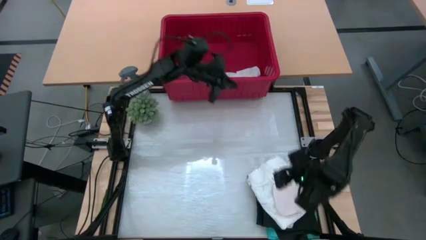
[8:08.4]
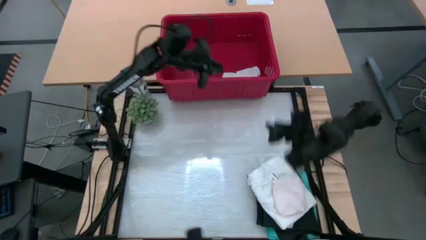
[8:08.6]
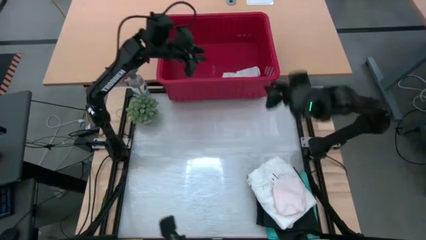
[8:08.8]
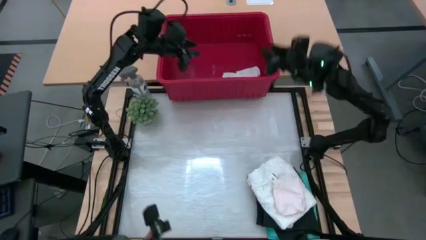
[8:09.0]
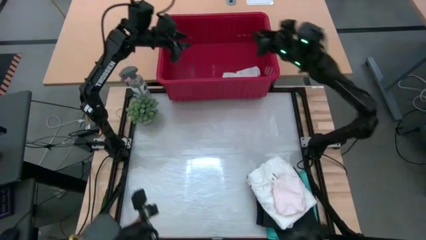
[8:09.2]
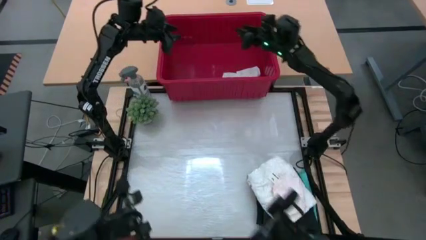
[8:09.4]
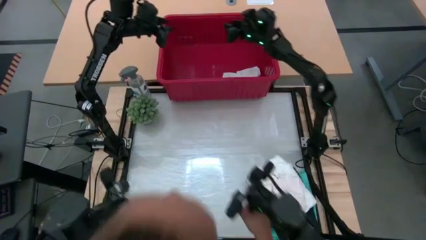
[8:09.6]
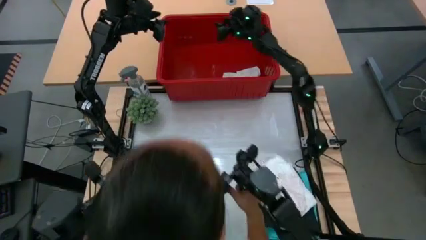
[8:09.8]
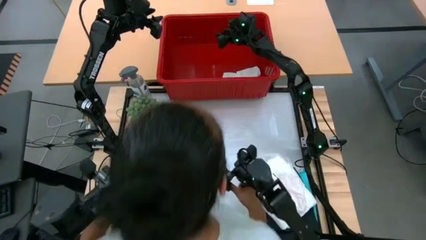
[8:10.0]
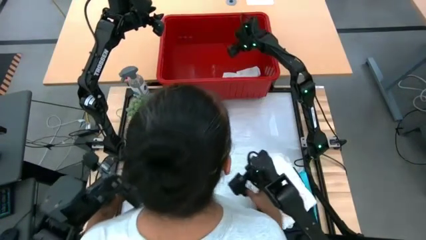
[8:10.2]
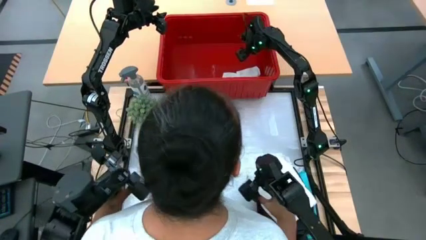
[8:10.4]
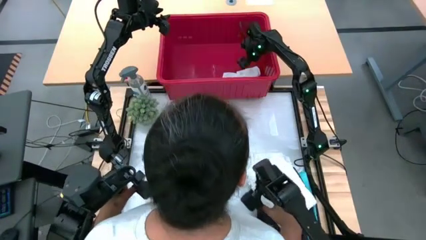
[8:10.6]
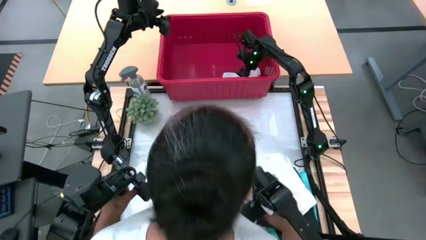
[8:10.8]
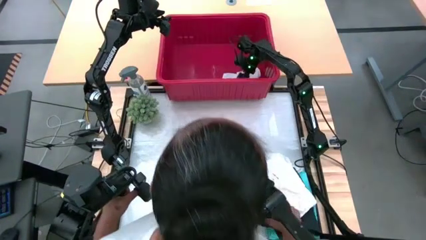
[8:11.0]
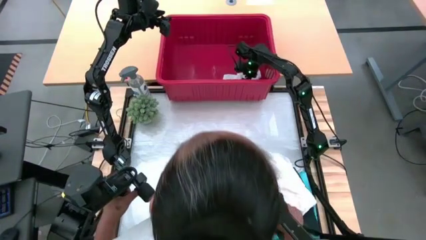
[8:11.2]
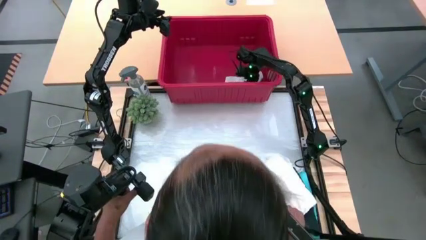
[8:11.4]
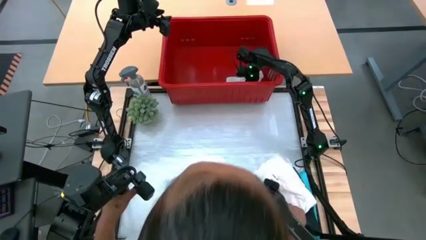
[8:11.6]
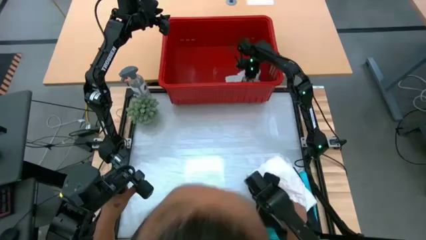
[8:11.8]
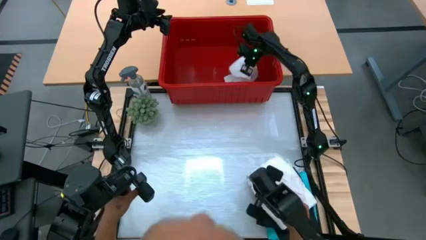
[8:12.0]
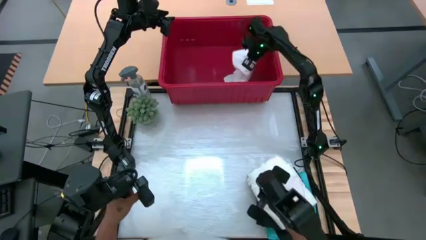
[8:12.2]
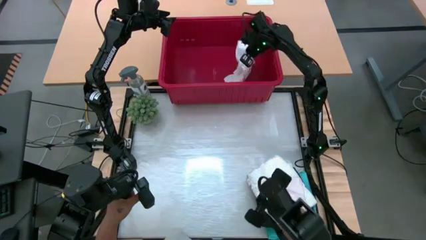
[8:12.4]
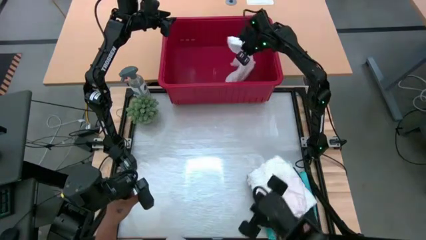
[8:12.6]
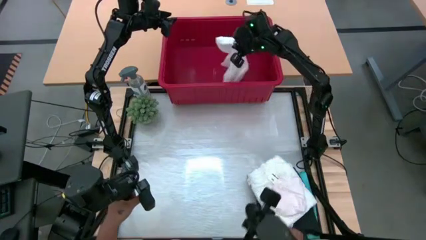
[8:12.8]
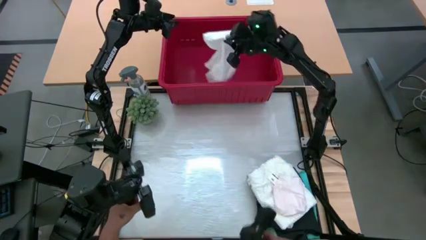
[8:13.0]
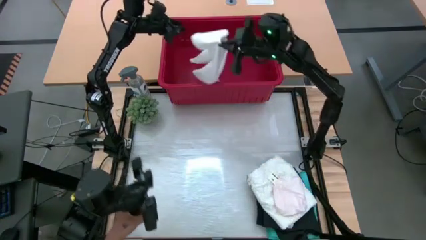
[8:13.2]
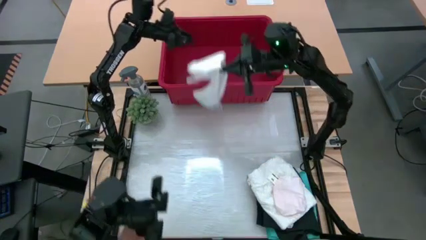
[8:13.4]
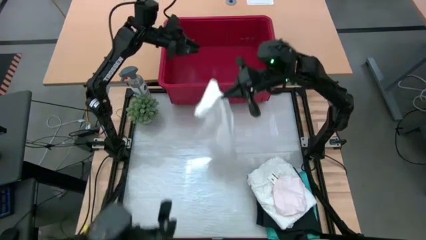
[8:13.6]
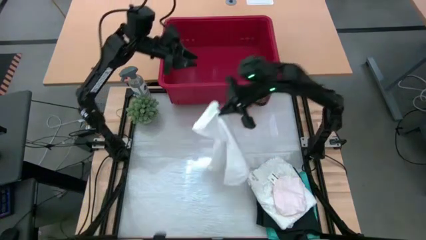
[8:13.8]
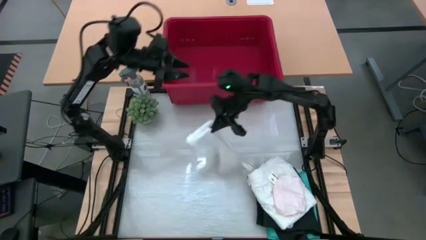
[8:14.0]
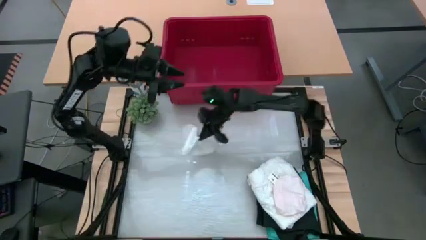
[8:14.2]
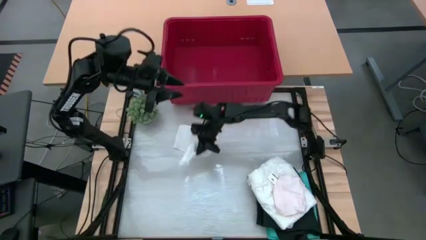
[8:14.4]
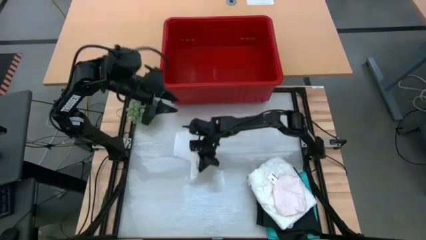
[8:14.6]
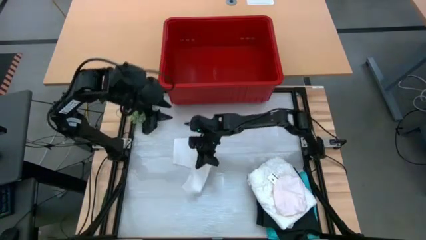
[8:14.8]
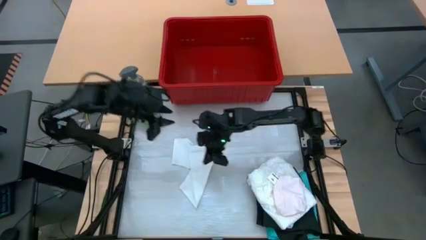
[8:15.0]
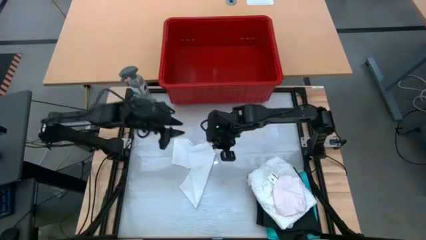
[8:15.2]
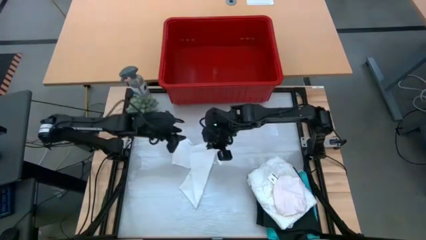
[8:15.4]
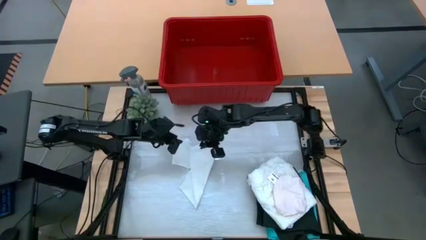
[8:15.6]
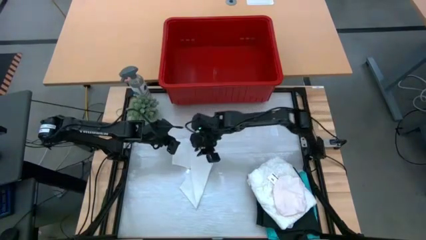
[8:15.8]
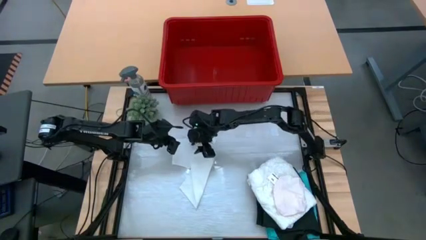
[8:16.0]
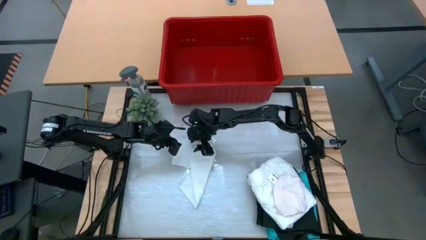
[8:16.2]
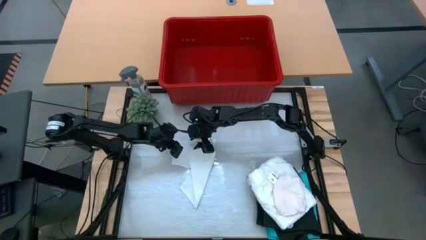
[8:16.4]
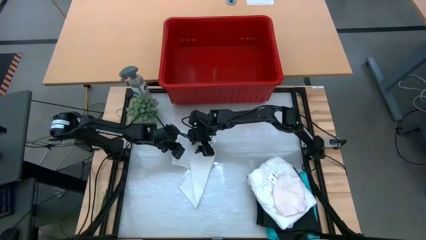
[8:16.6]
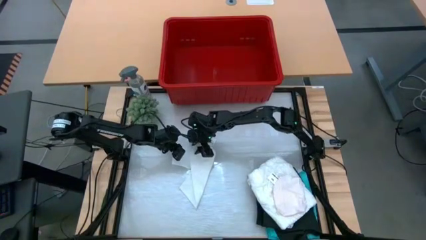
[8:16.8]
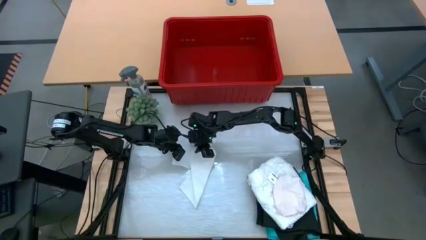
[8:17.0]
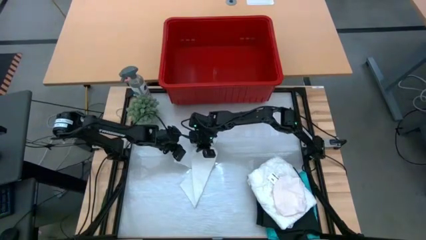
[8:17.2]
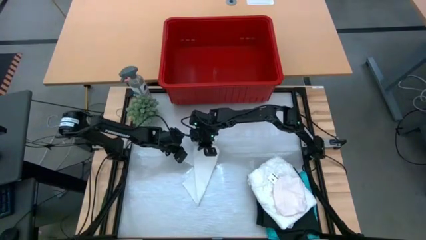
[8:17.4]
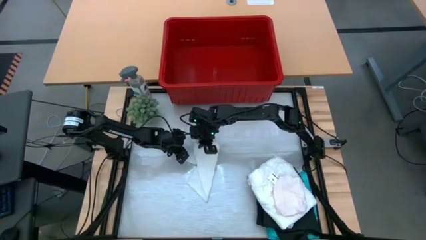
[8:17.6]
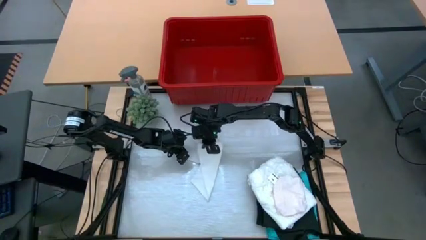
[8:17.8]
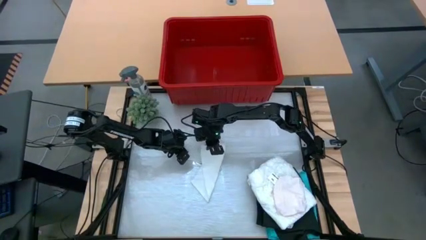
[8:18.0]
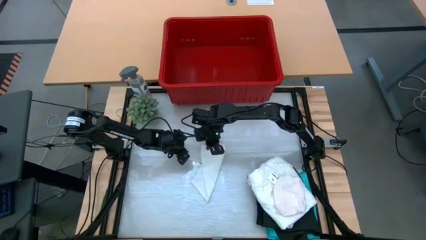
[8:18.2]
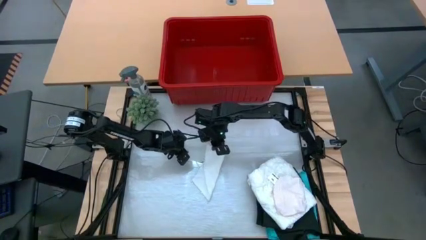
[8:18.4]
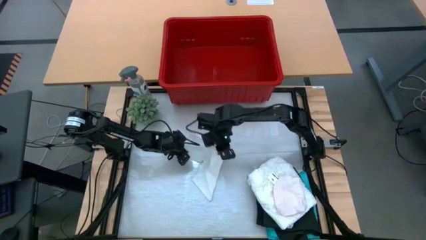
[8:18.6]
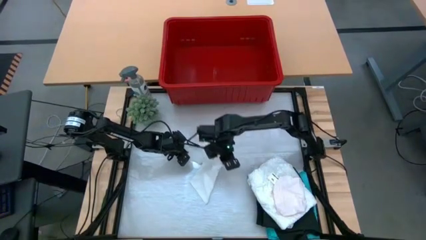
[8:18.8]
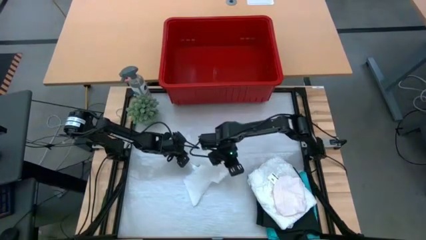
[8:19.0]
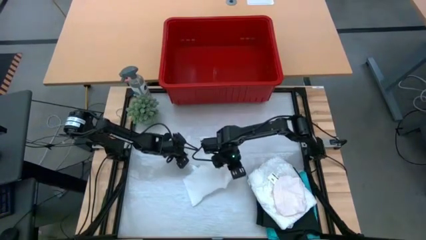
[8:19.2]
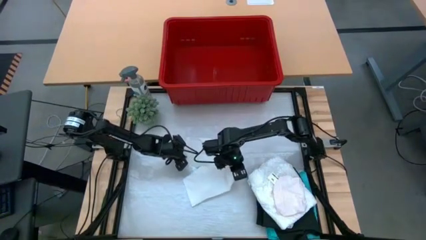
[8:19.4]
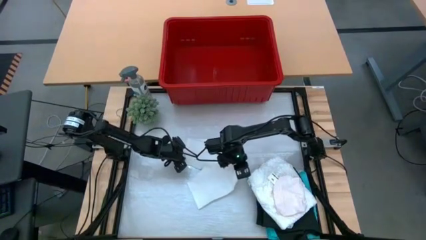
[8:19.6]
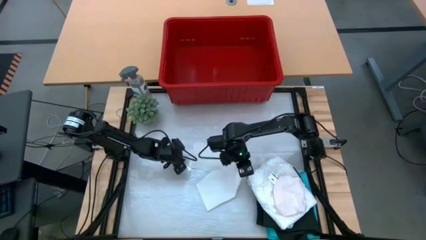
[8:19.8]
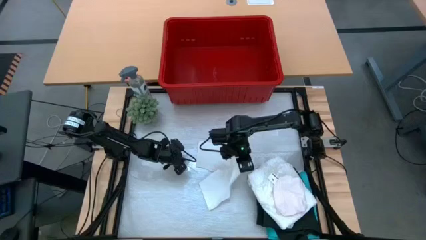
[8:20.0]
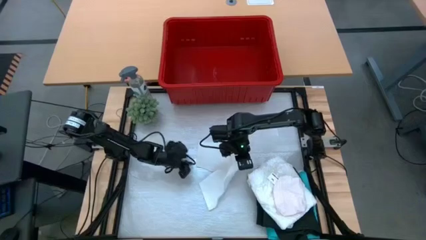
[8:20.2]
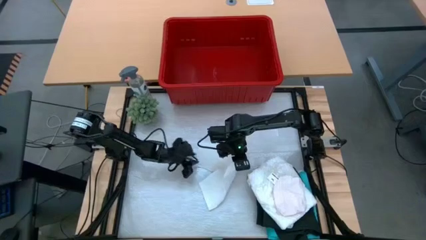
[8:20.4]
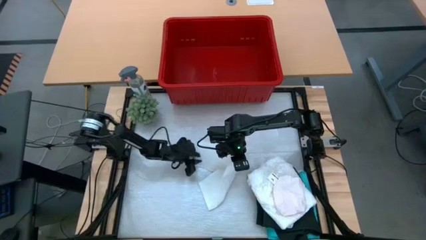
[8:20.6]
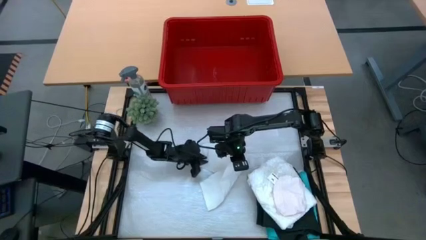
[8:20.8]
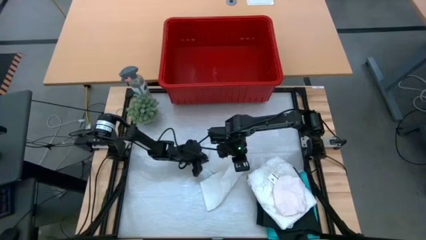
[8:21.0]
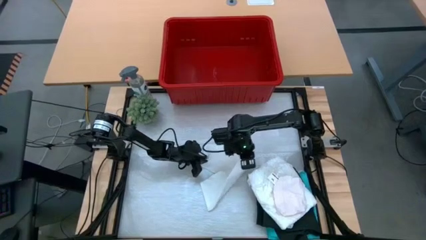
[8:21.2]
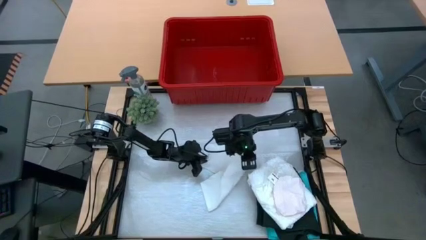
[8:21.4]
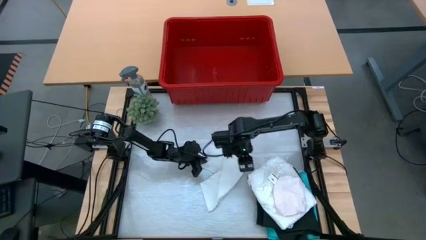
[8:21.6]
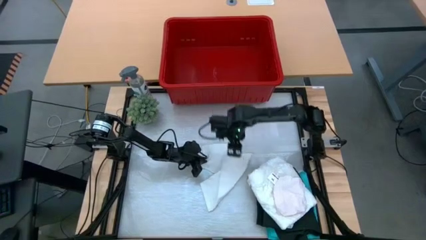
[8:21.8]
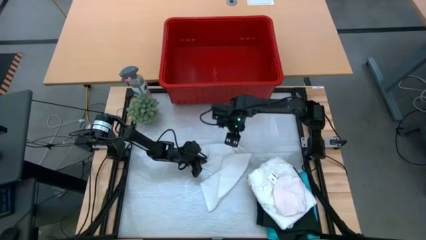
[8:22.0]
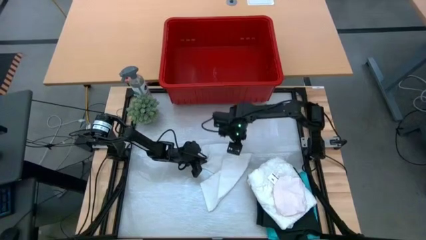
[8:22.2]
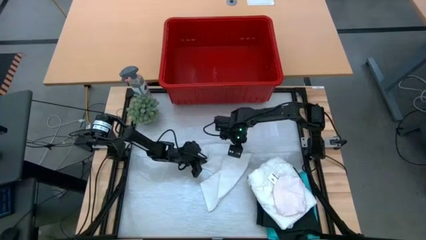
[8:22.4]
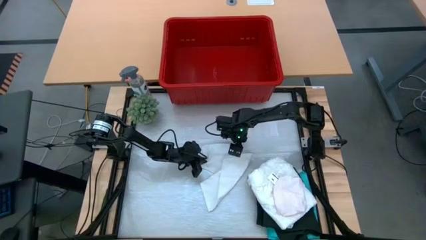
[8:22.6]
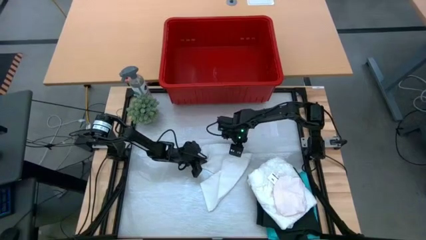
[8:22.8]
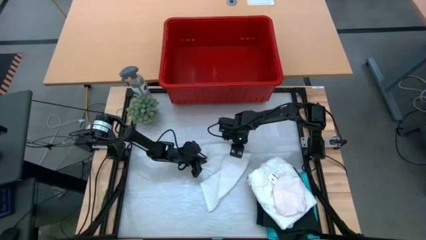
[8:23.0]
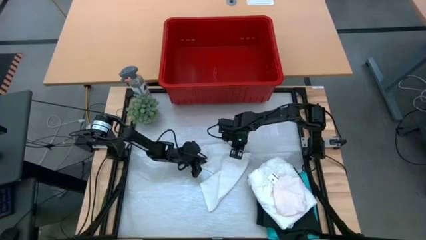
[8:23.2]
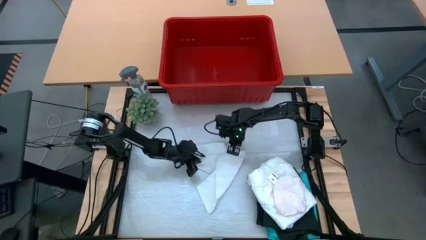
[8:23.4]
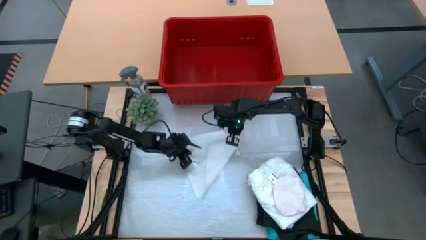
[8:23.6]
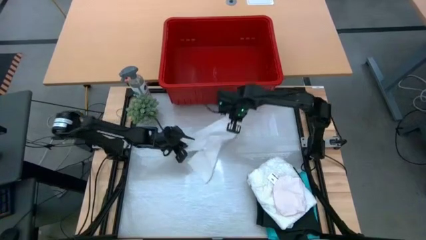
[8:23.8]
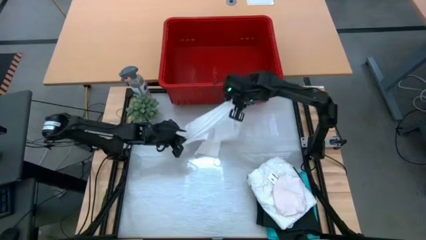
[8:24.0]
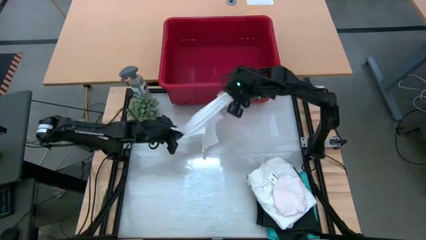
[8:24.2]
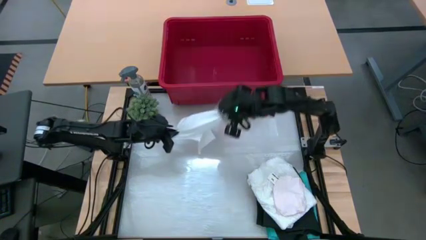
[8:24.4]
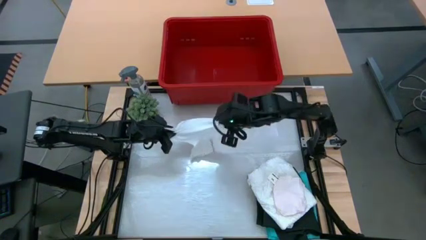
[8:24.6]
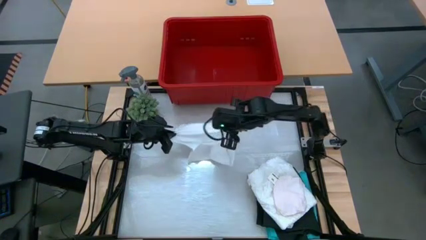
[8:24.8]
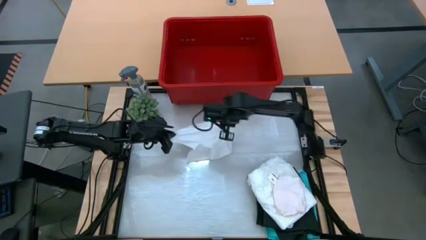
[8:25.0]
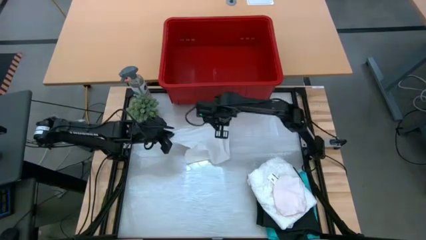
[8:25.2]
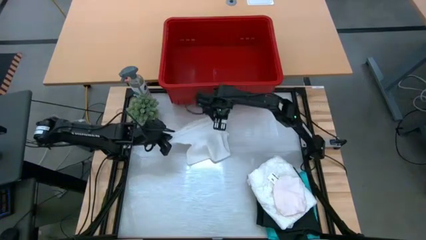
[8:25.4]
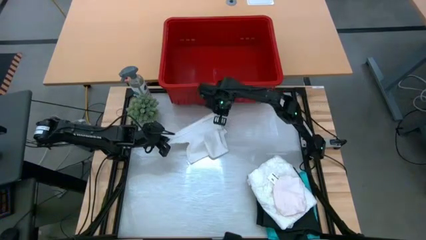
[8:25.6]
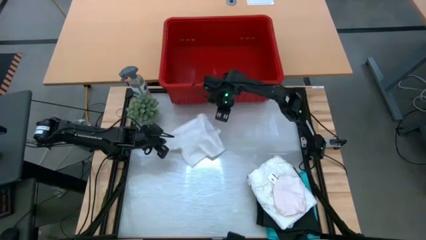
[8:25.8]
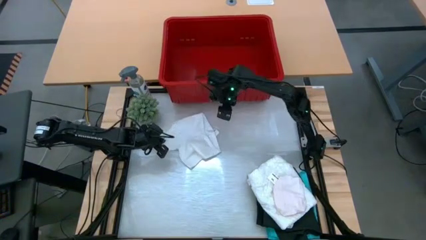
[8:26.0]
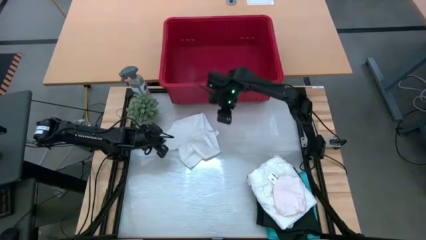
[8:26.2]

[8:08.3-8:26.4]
Task: Fold Laundry from Bin
Fold the white boxers
